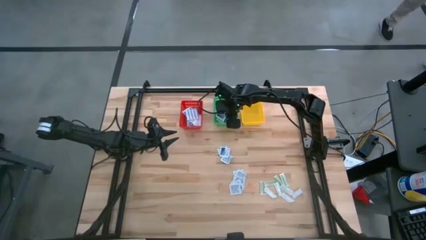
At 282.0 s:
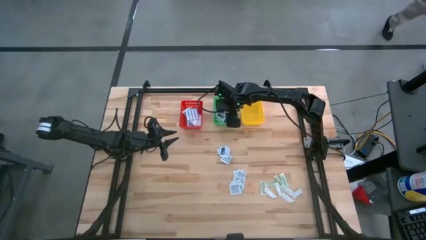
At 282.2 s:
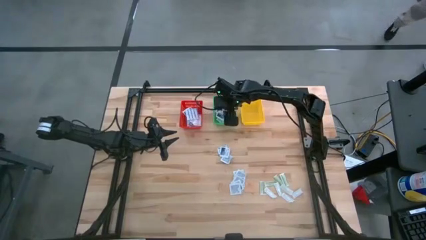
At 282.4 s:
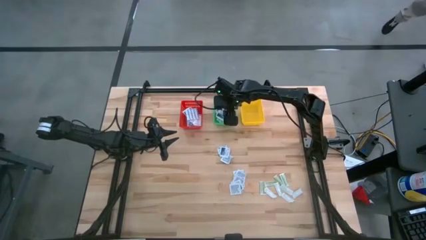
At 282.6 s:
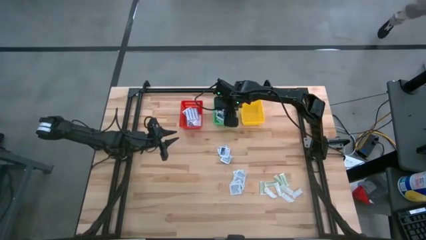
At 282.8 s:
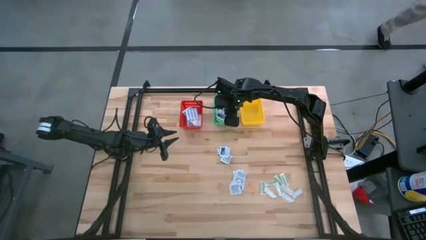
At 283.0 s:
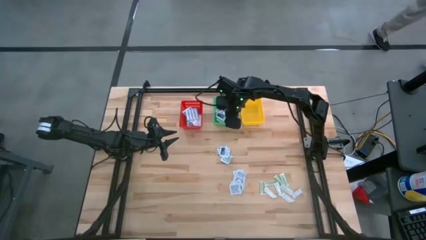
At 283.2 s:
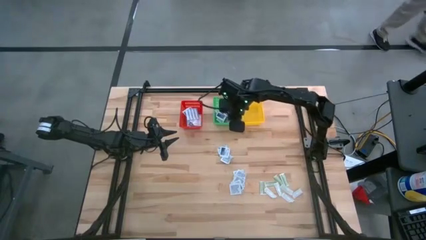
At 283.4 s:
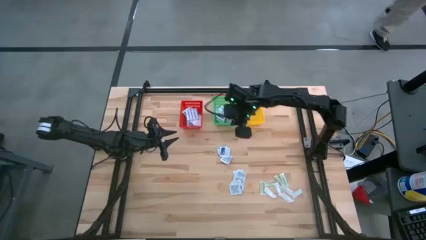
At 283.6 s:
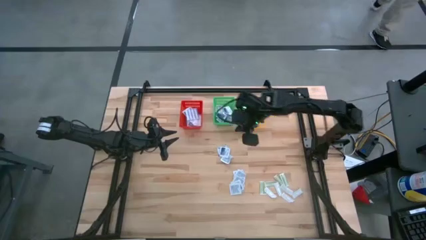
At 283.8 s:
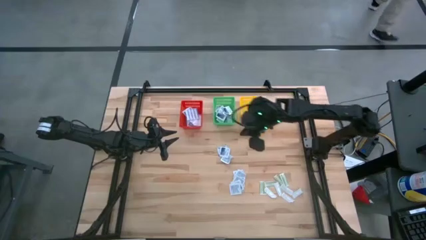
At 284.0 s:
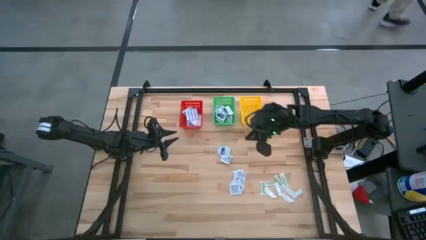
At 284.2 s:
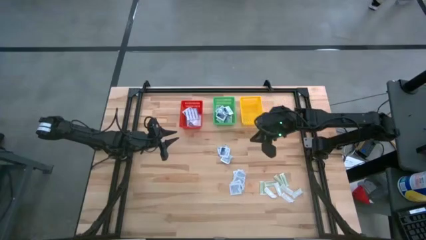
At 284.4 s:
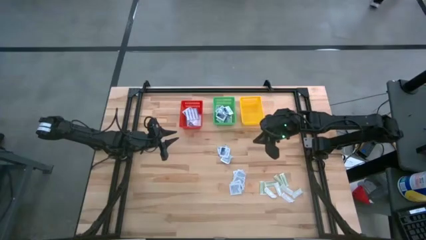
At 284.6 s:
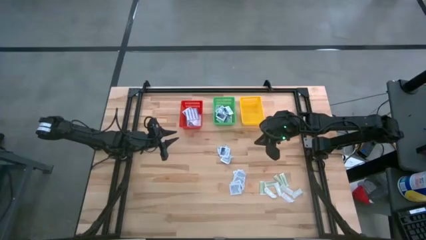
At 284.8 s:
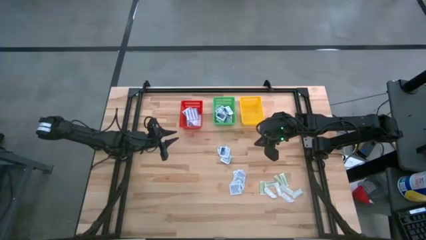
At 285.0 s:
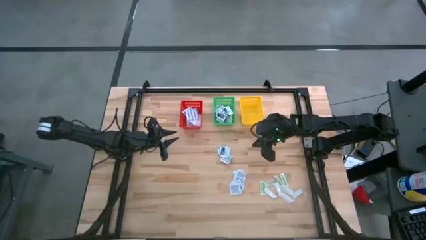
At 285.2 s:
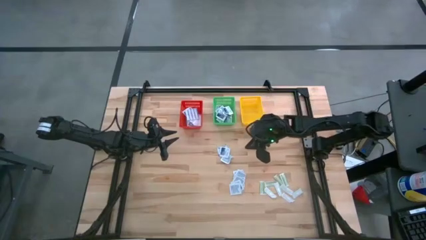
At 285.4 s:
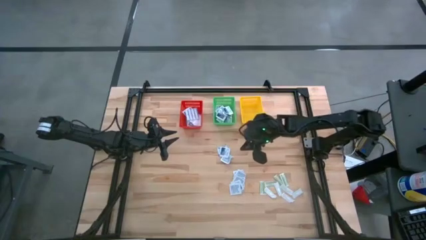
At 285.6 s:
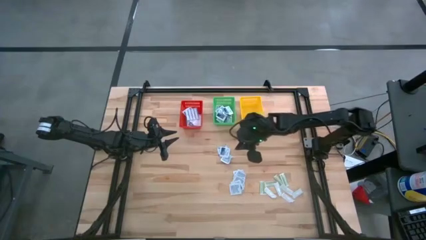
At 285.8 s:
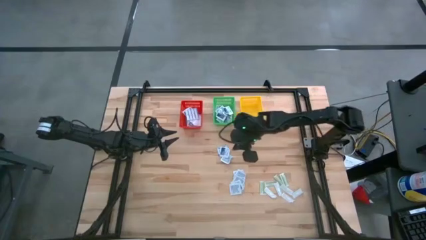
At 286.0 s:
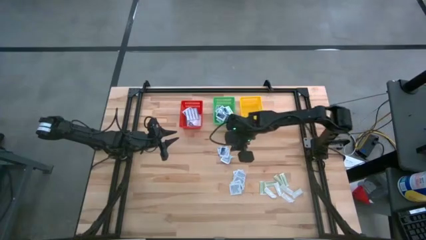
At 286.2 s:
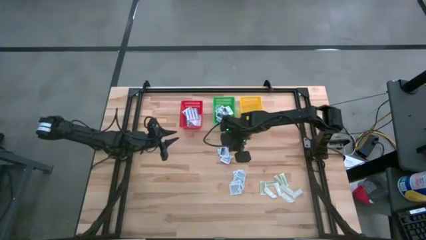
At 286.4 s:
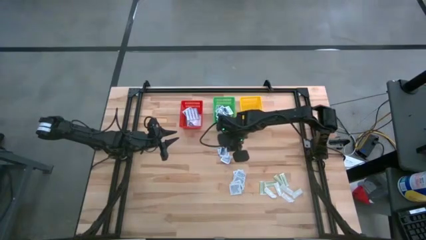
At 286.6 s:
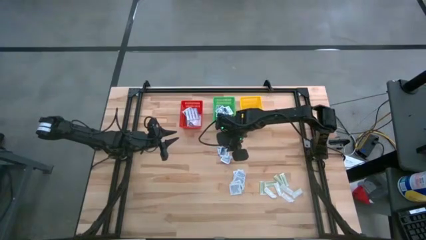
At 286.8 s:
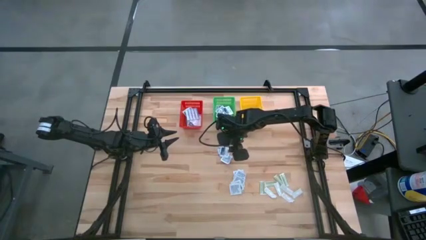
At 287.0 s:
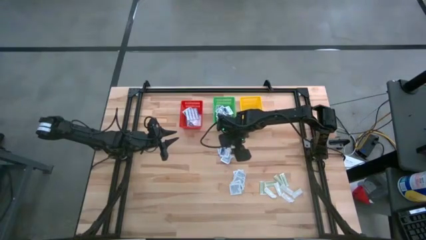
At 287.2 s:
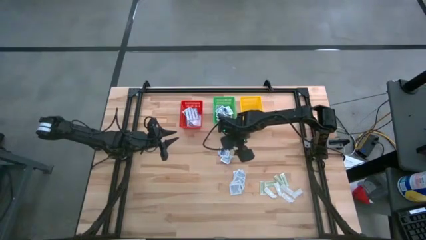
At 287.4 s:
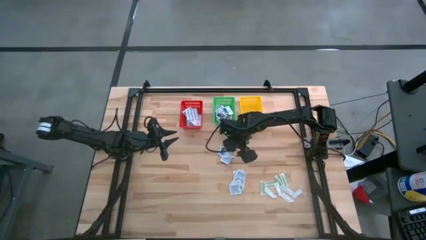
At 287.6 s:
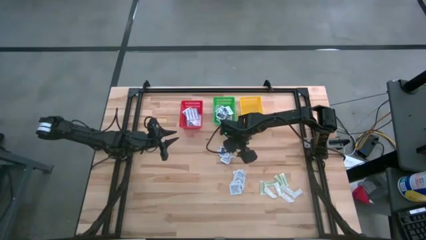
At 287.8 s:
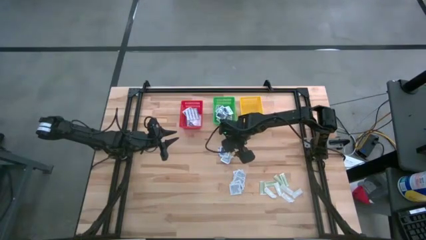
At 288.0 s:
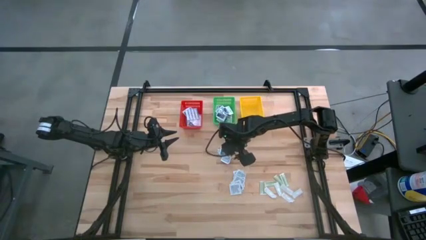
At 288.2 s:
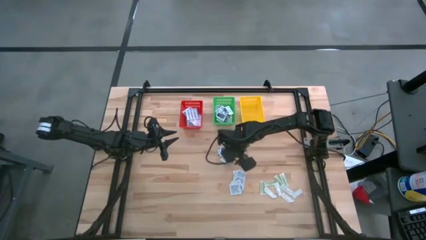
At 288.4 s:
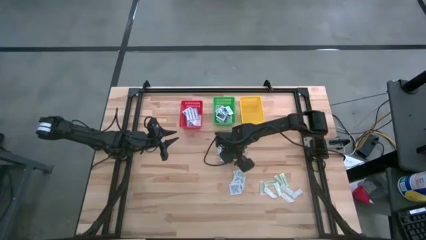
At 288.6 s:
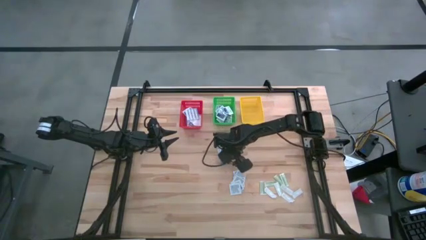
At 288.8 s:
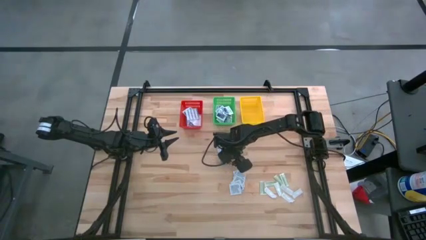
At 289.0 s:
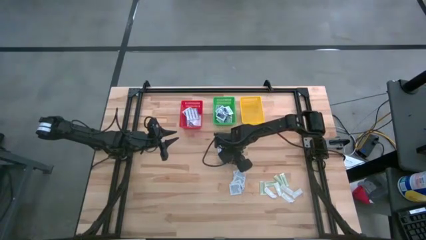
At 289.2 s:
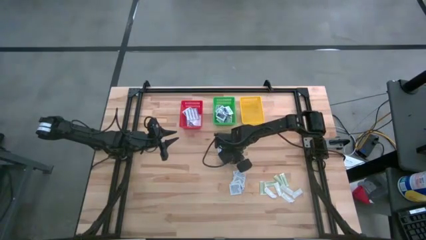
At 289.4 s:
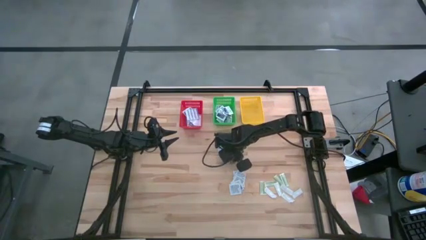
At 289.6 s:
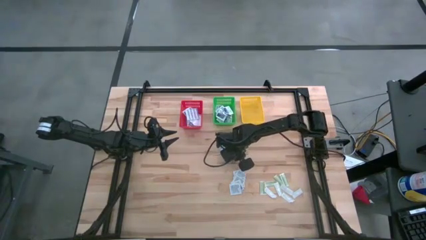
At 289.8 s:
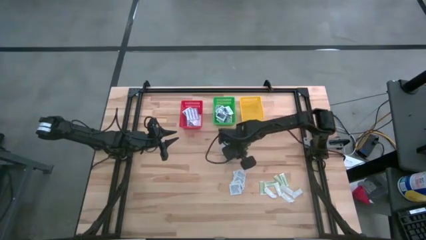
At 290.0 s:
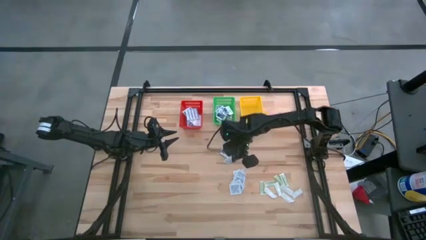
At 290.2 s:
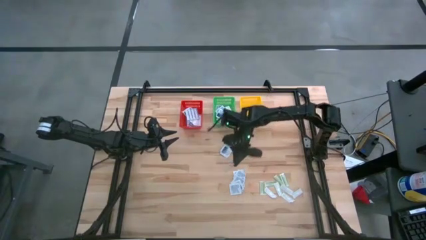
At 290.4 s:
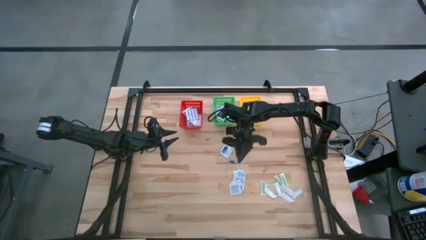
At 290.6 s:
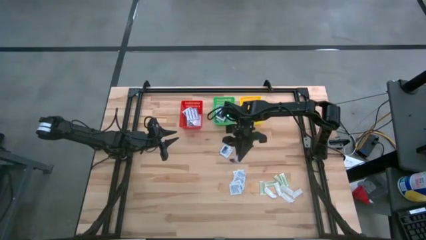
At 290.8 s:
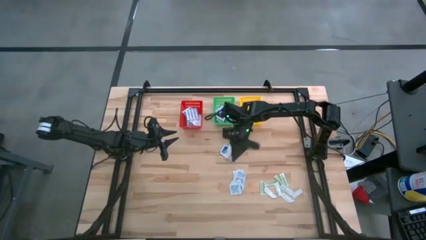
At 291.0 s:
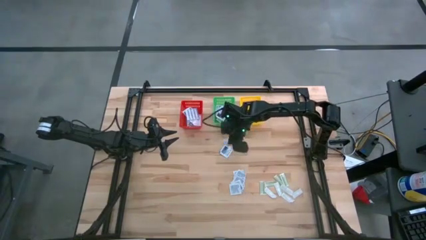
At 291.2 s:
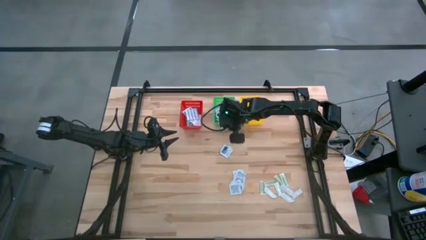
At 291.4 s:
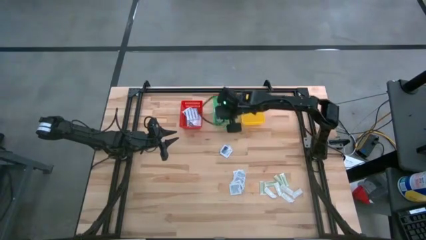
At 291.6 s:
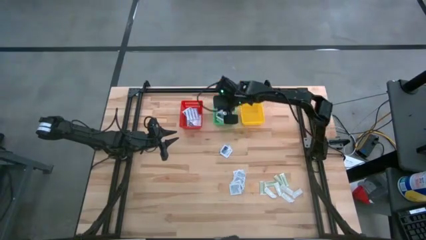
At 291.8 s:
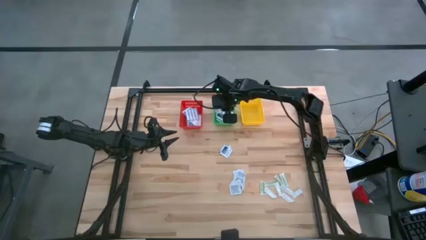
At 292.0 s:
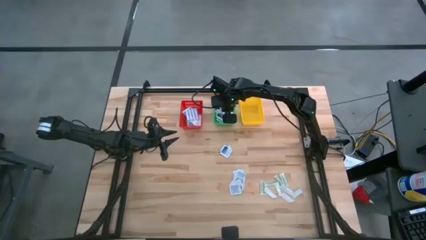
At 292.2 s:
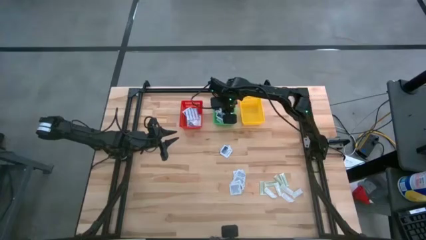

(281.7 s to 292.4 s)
Task: Pick & Place First Aid Supplies
Put the alcohol pad into the green basket

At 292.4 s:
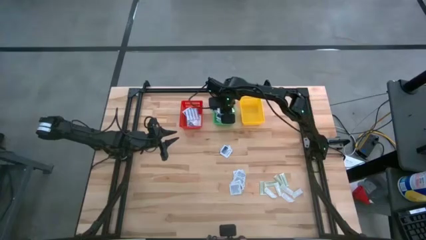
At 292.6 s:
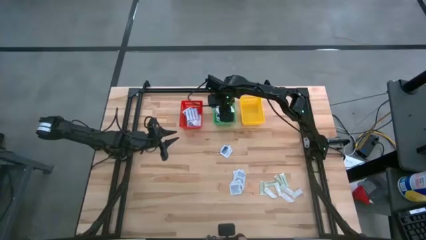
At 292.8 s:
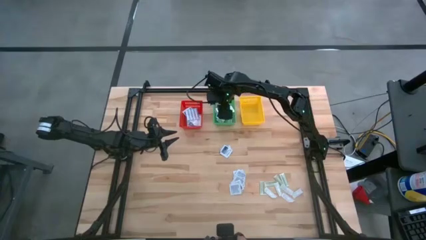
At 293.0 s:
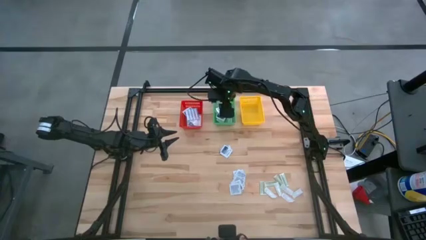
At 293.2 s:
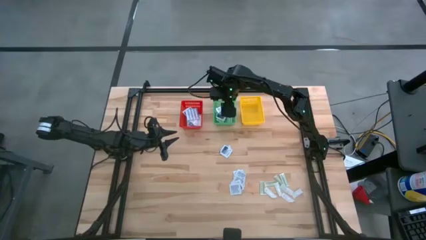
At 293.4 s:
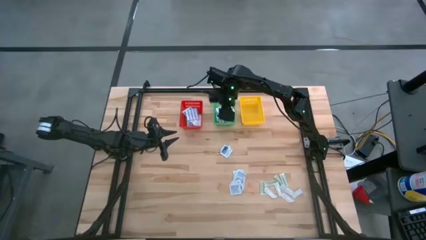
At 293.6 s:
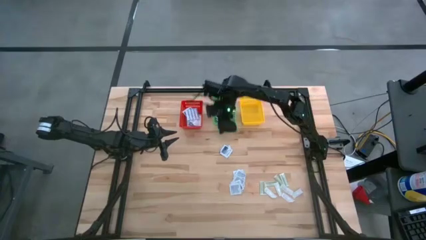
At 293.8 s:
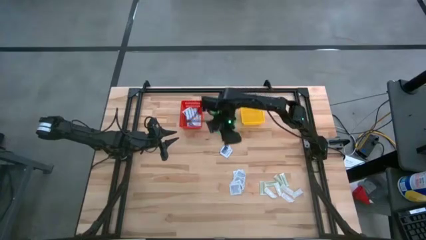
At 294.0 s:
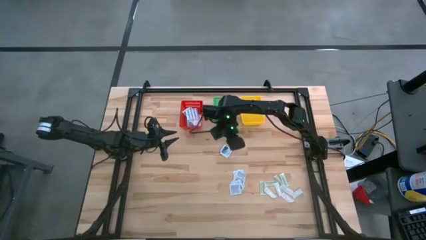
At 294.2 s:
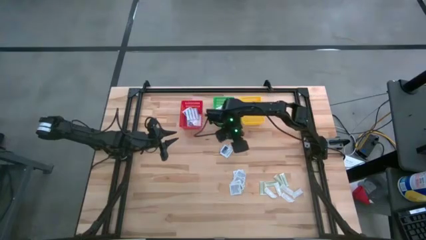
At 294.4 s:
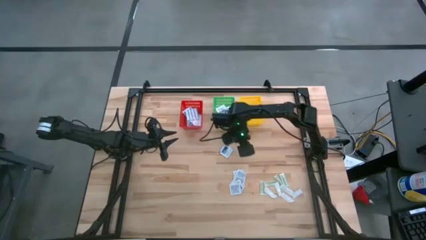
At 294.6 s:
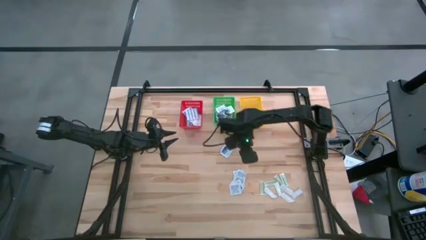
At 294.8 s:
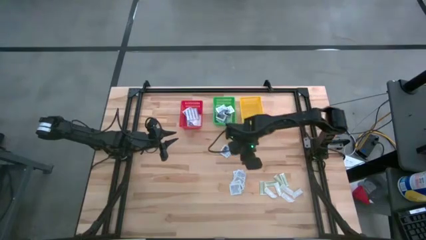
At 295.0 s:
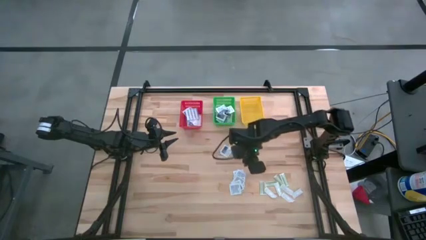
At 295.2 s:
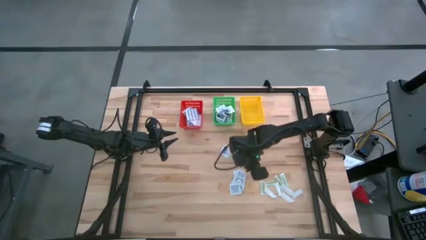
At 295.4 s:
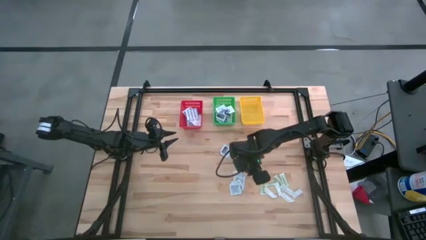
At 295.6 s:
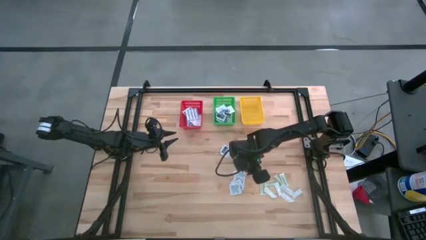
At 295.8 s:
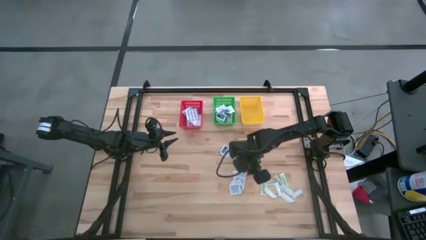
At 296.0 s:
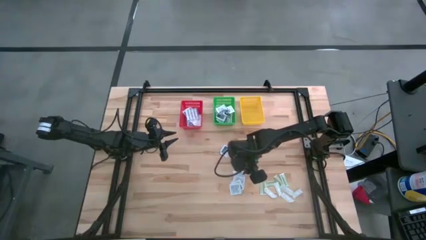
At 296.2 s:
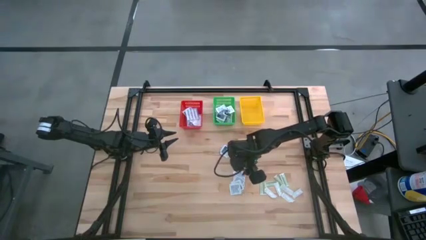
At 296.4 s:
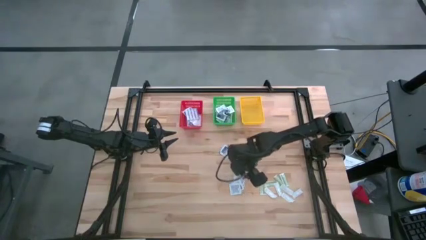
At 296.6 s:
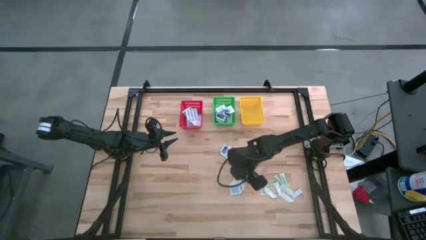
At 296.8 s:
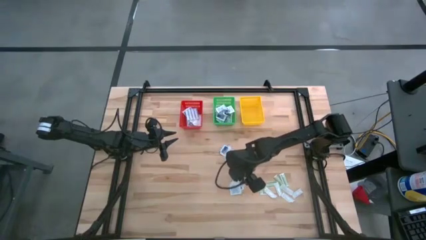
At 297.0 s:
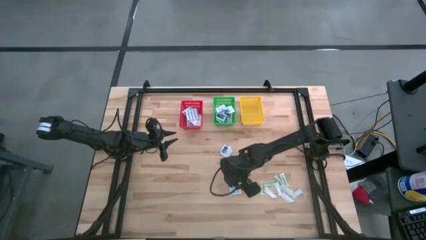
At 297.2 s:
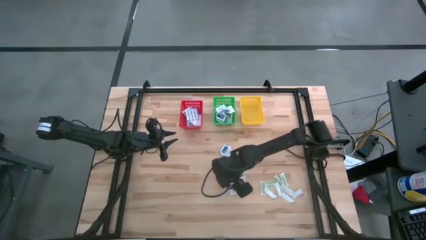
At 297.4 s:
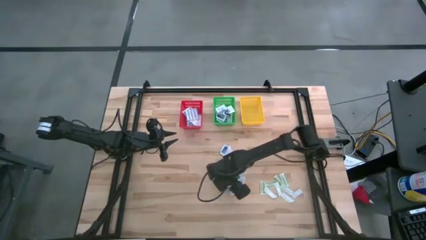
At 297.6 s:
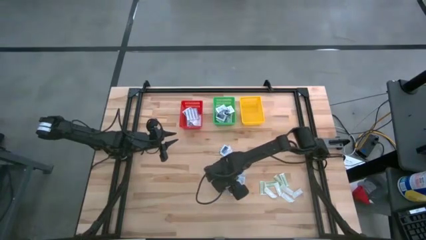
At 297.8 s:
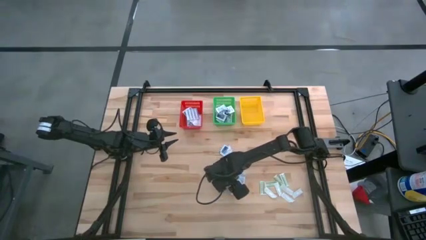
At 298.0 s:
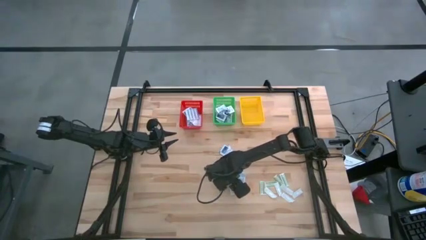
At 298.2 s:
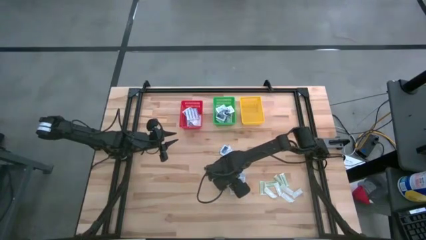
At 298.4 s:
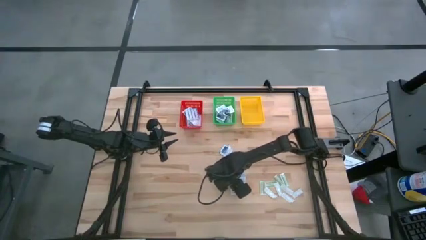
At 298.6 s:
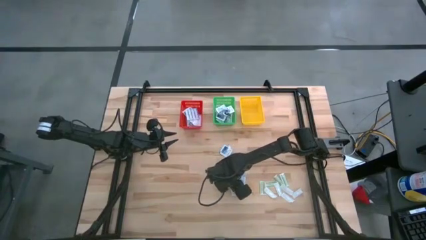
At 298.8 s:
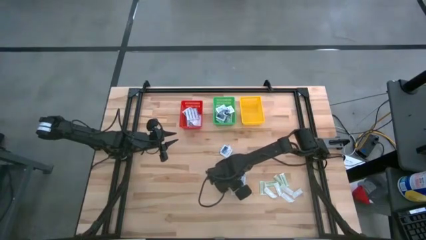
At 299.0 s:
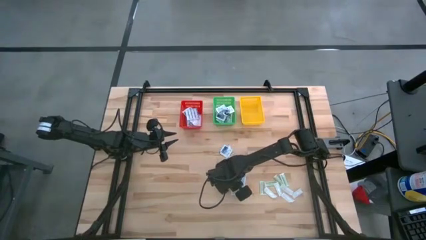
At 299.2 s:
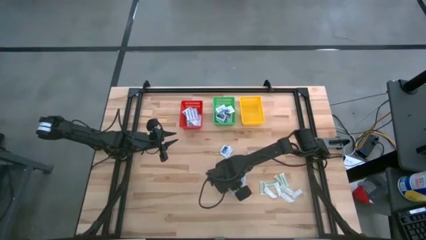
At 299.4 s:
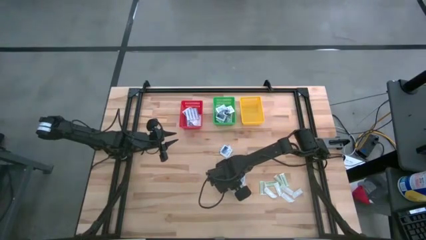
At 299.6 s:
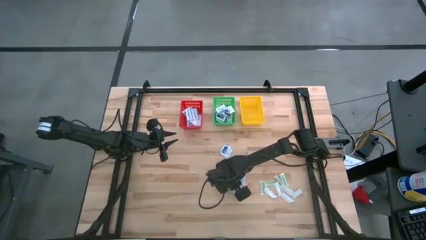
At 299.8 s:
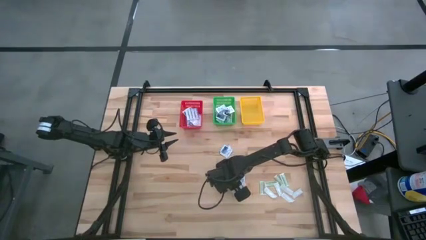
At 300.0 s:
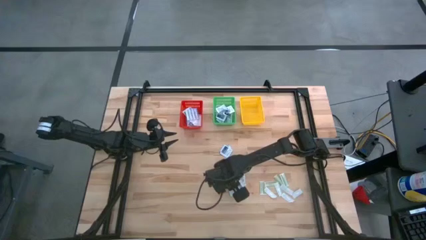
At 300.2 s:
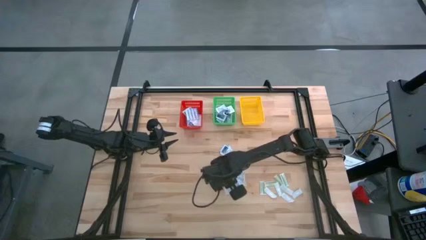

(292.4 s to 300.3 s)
Put the green bandage into the yellow basket
